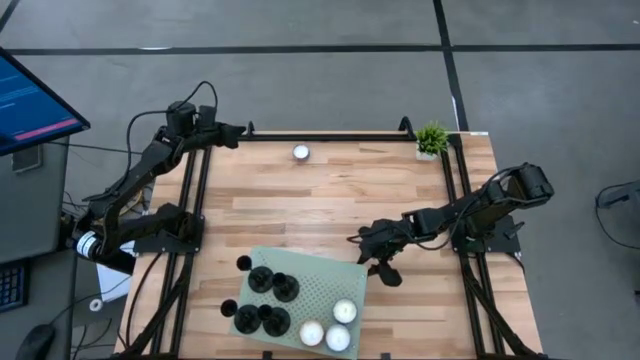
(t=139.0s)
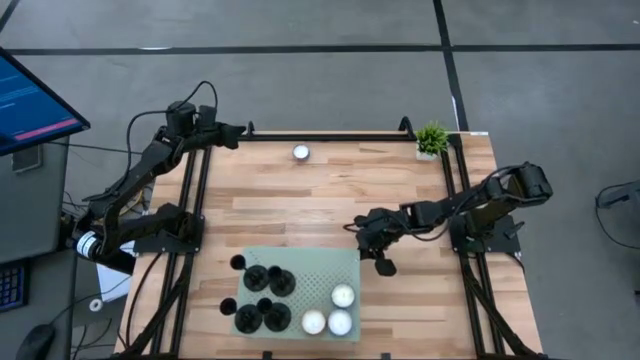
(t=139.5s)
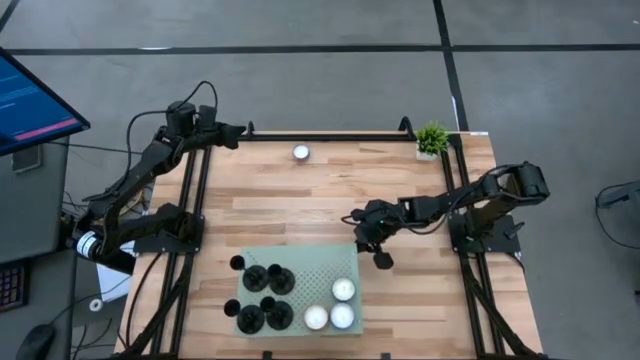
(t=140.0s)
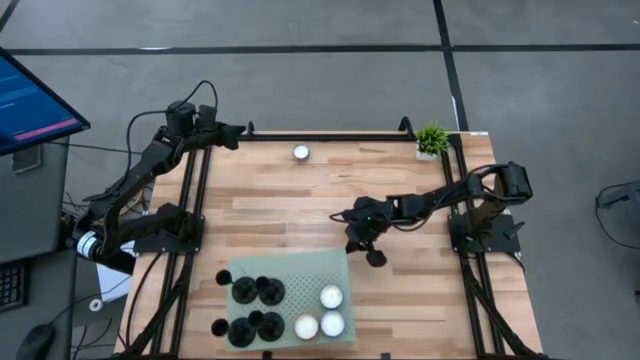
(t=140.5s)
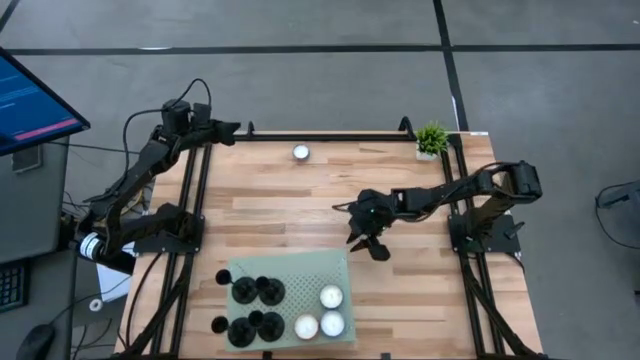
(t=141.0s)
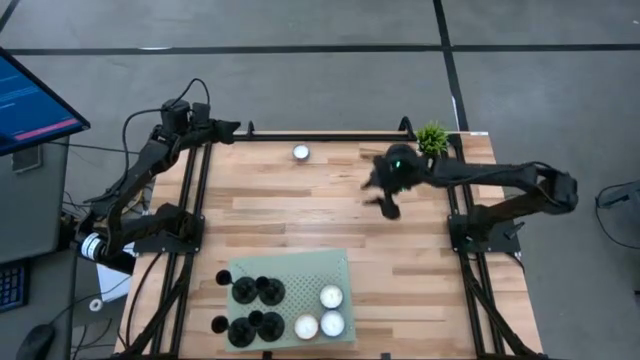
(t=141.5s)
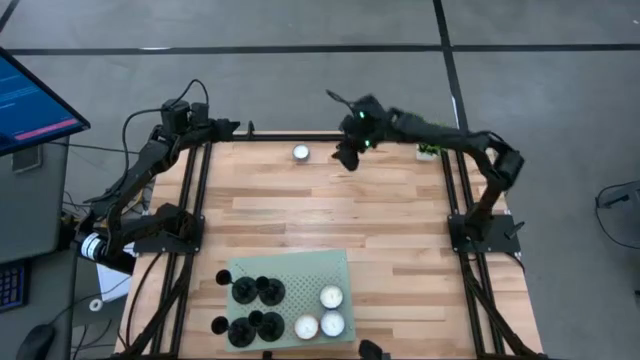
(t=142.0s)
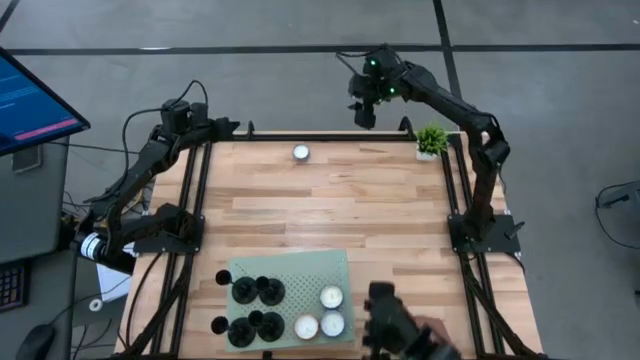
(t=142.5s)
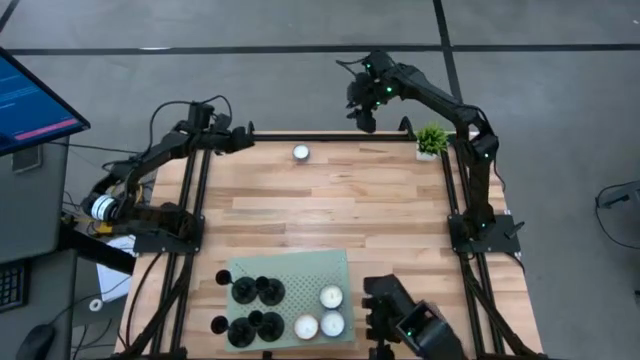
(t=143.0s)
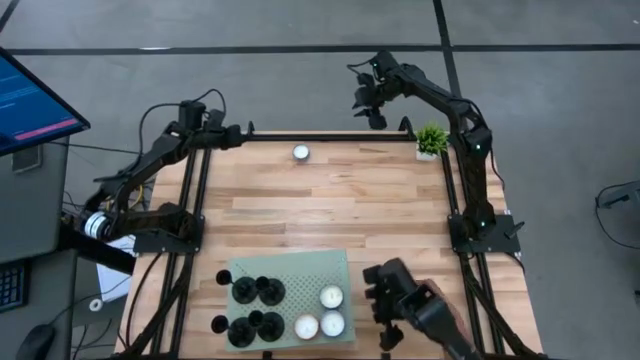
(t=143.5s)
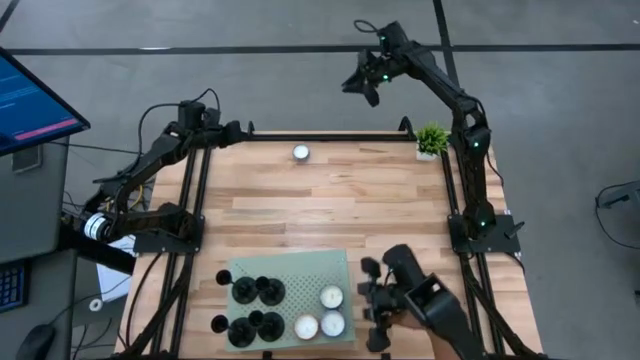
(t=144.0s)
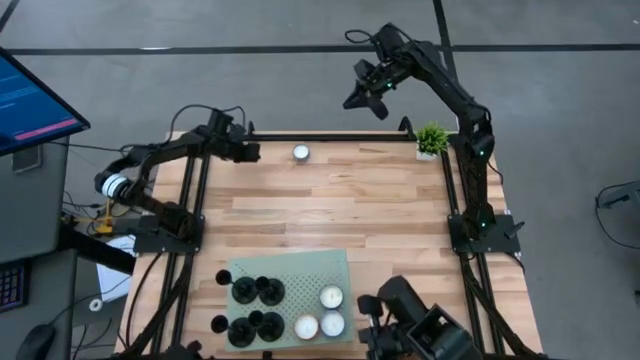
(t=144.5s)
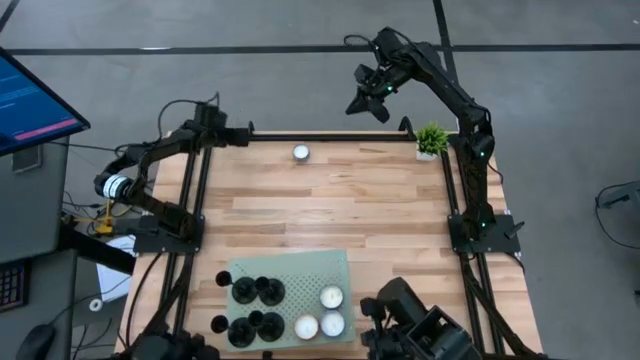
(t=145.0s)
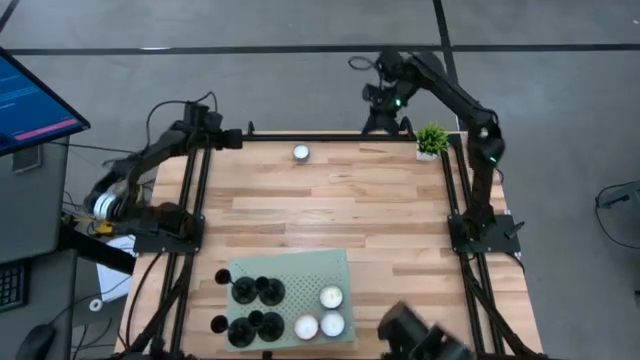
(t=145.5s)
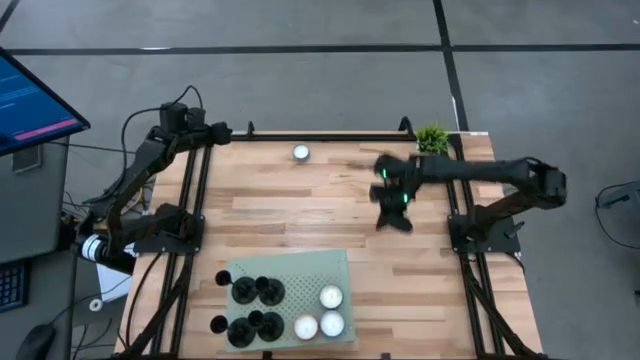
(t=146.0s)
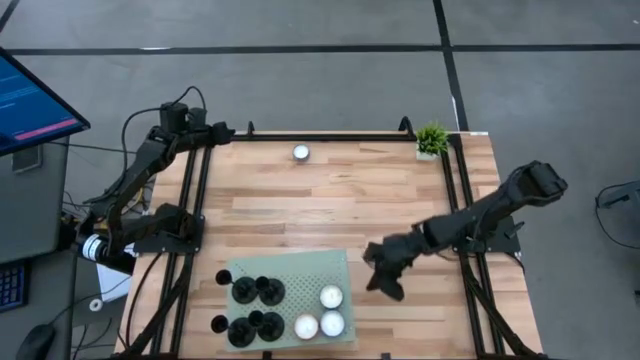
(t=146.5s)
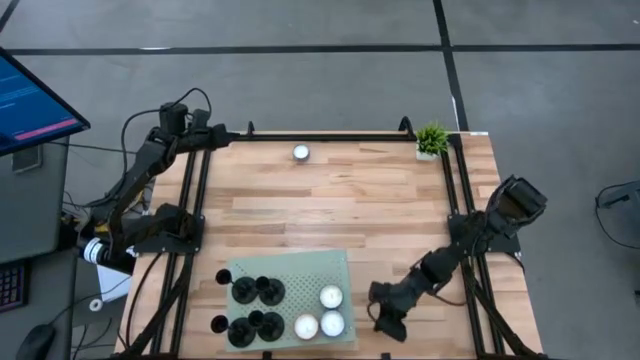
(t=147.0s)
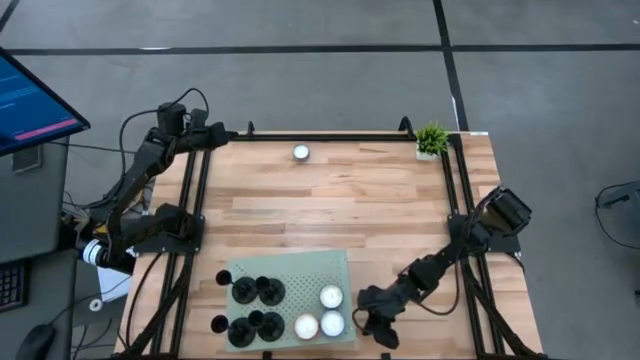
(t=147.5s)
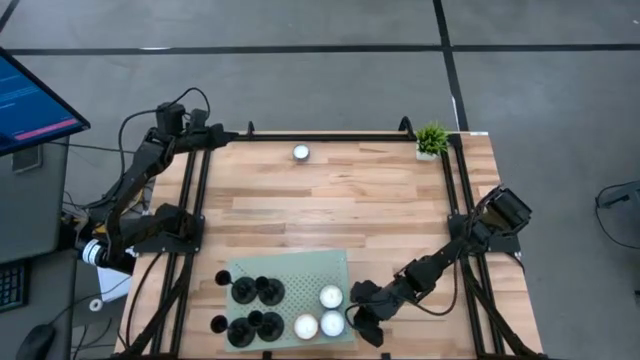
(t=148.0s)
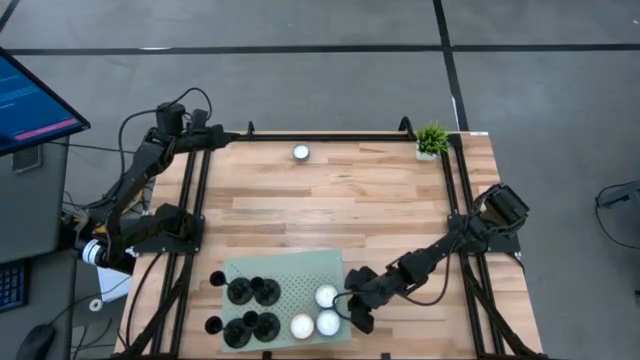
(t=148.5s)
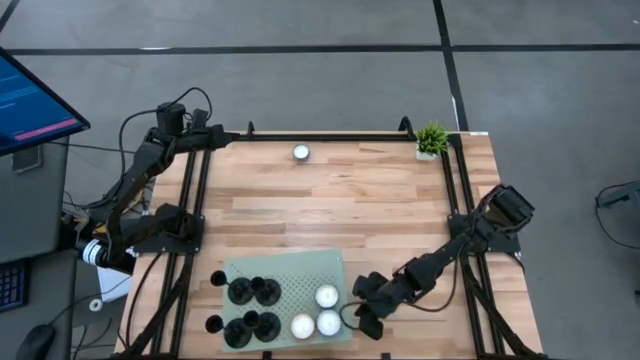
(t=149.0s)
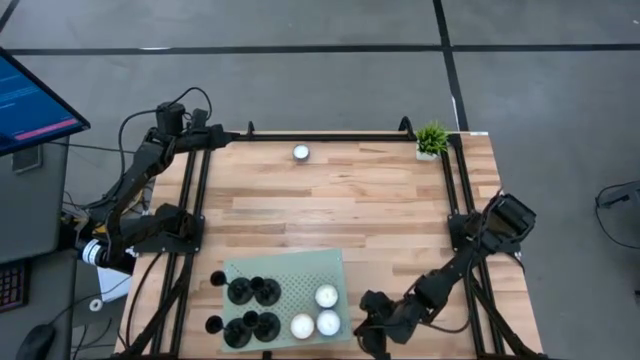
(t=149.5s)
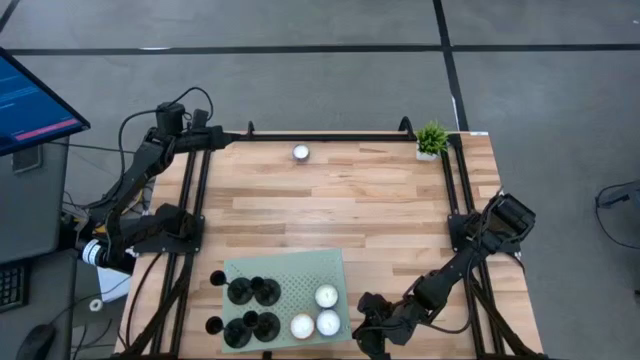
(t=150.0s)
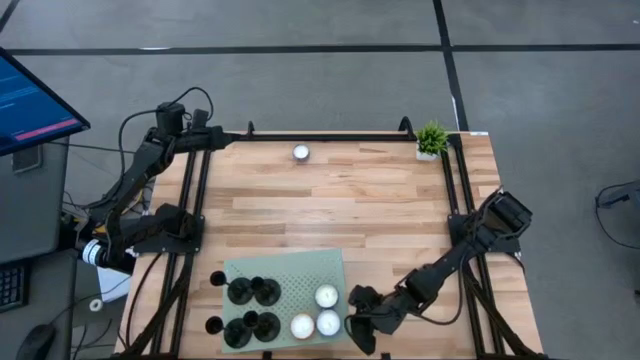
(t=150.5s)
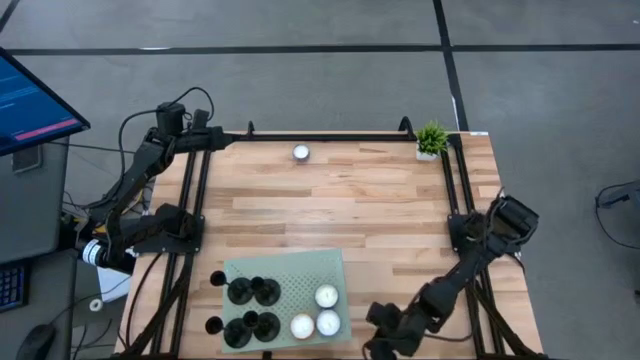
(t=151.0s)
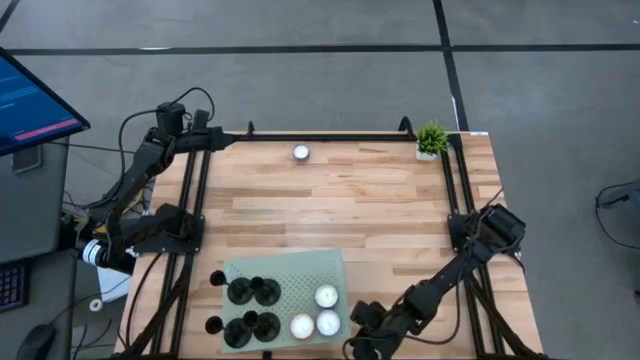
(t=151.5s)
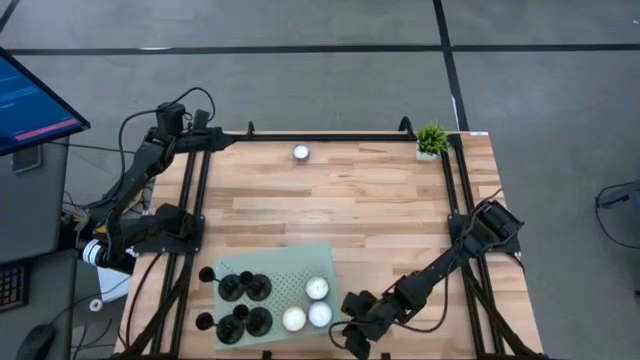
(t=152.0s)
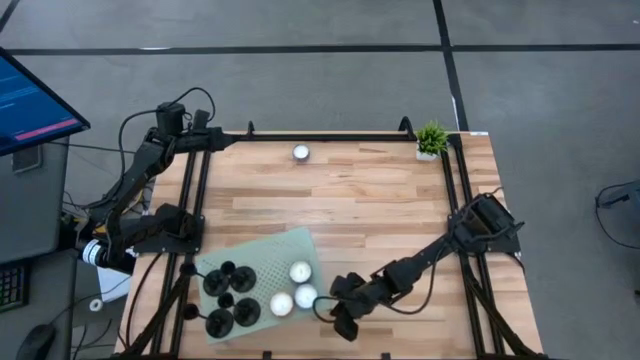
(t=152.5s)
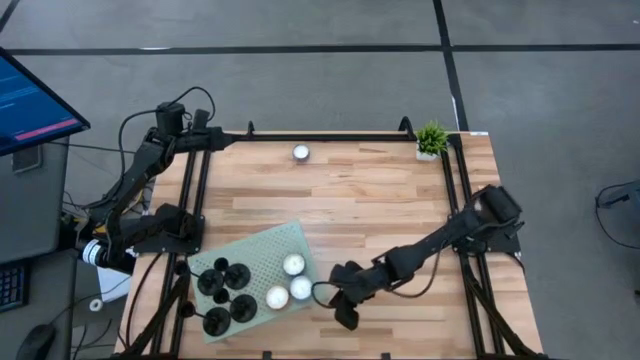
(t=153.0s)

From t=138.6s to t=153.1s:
Task: Stock candles on shelf
Adjust the shelf

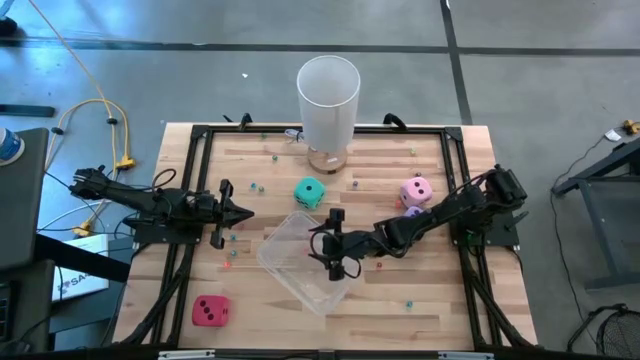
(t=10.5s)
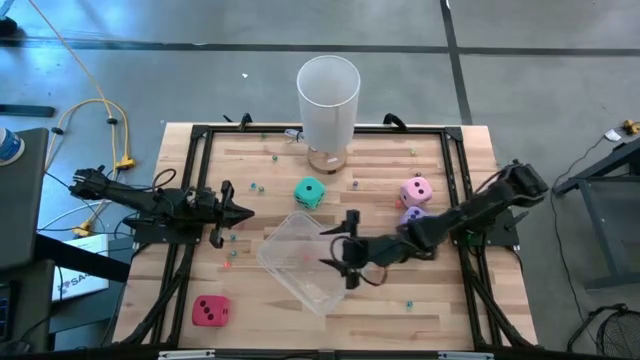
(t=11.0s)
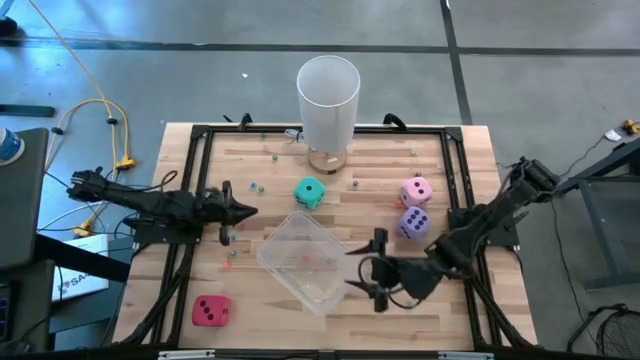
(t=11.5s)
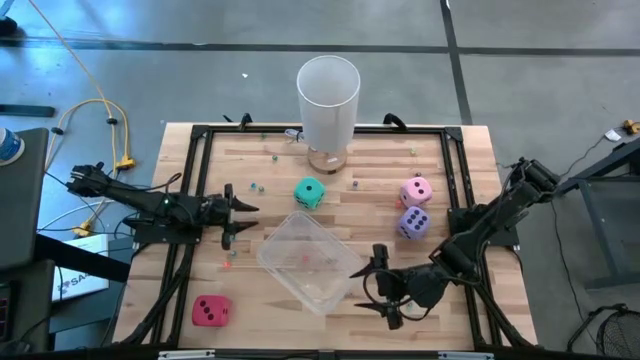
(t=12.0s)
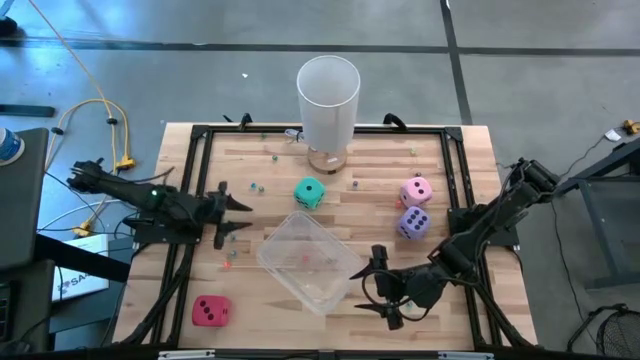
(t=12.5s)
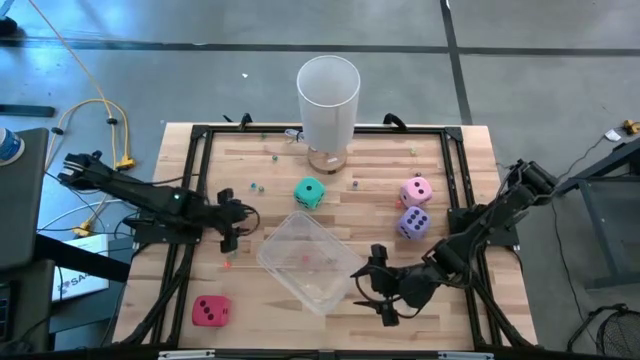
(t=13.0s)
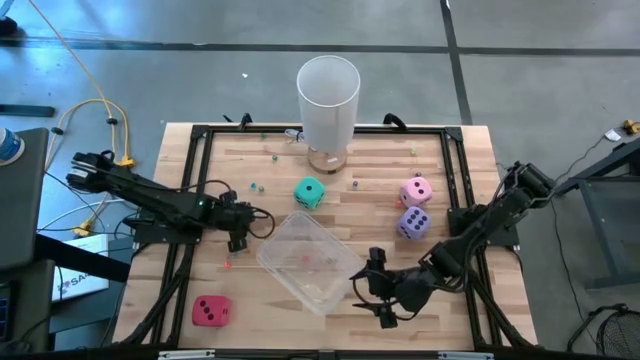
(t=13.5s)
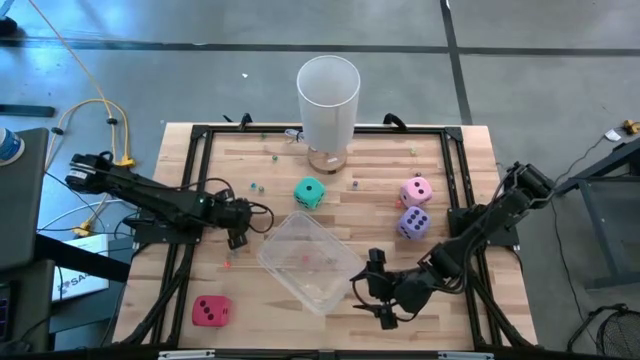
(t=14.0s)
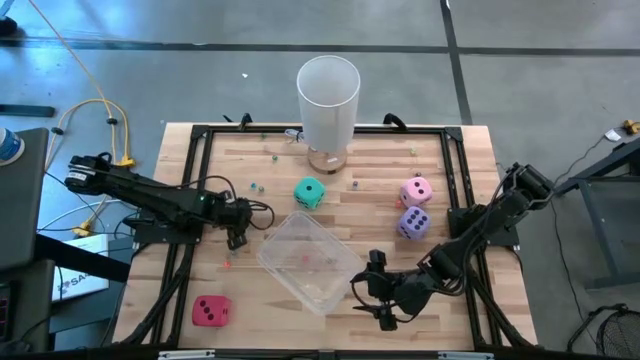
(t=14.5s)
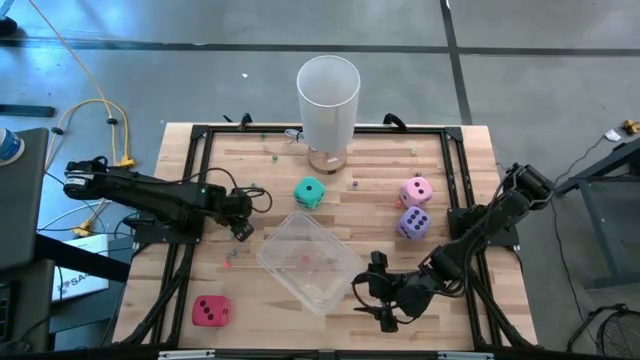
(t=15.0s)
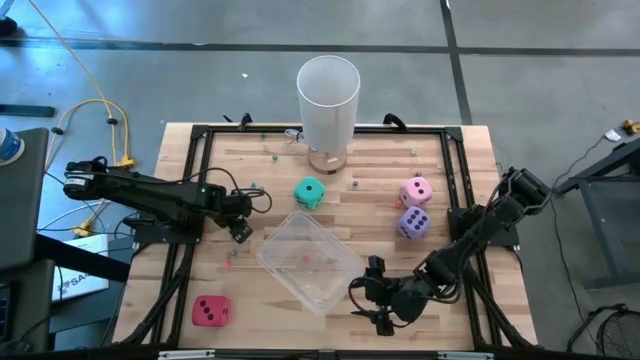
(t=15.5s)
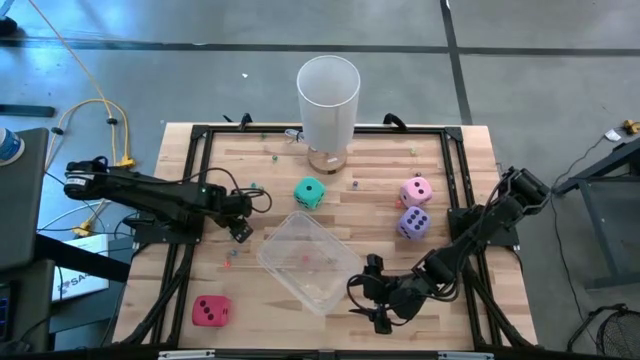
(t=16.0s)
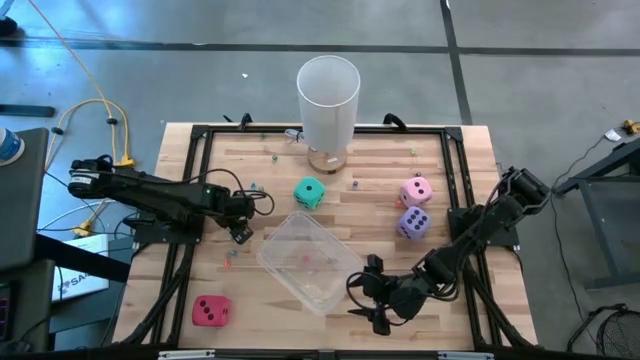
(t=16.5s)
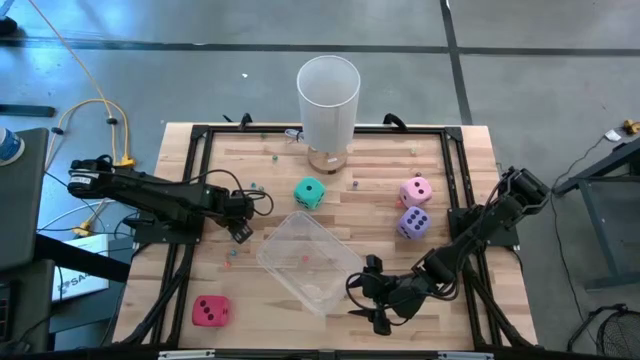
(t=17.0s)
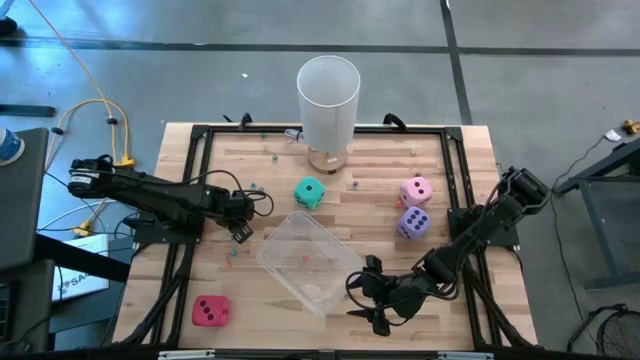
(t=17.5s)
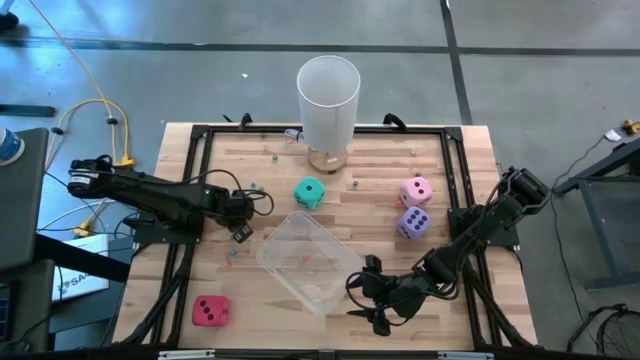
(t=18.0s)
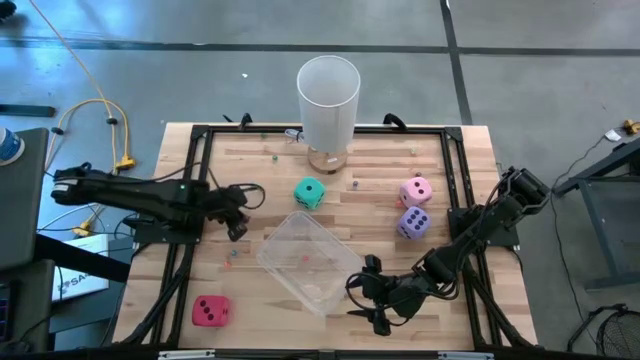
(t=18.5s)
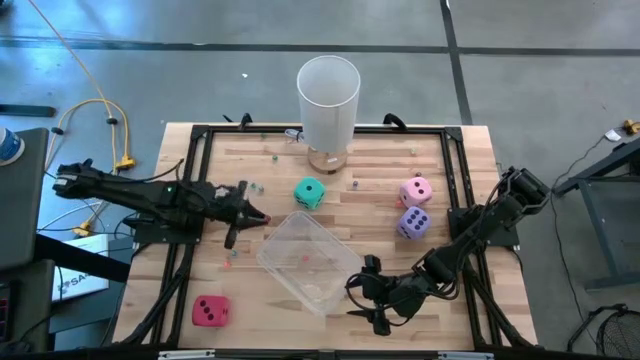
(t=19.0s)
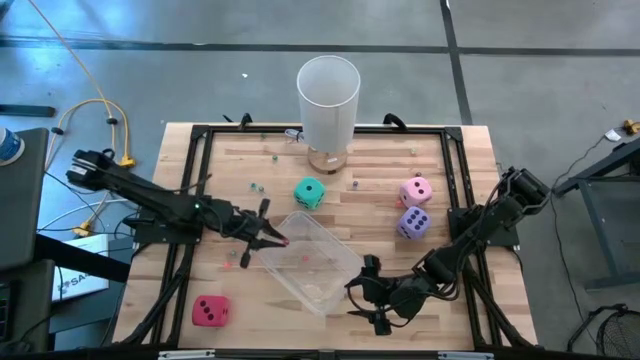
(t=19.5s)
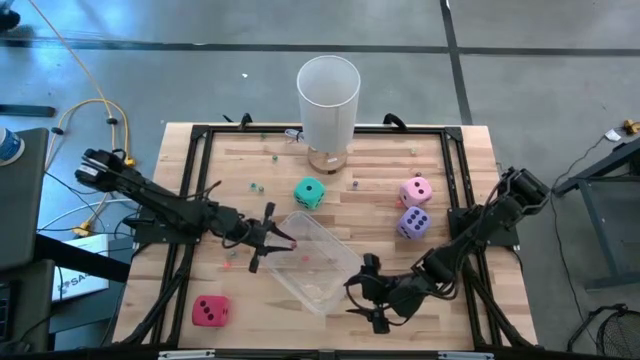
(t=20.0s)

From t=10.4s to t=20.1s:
Task: Pick & Place Dice
Put the small red dice into the transparent bin
